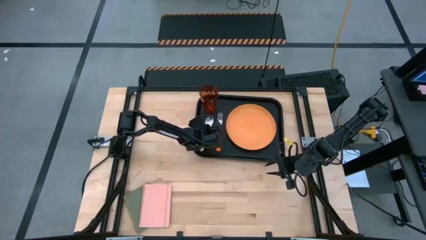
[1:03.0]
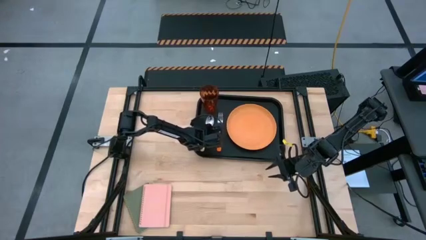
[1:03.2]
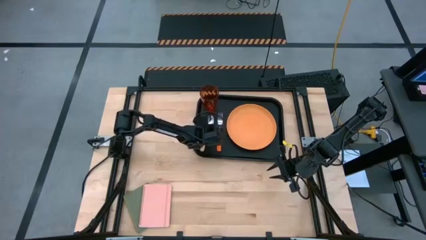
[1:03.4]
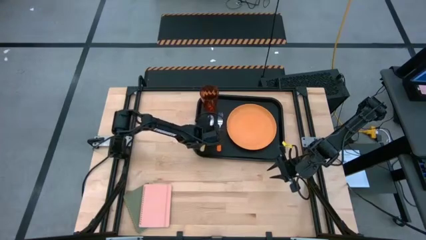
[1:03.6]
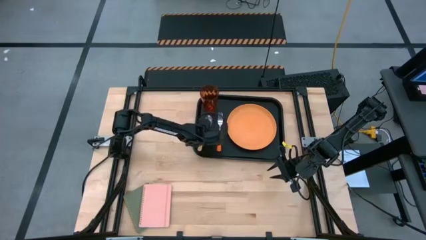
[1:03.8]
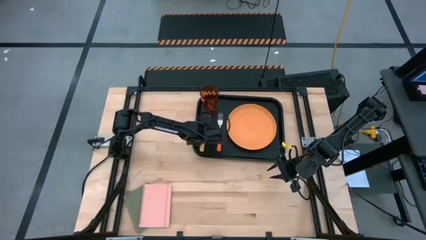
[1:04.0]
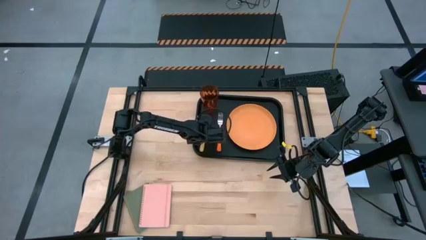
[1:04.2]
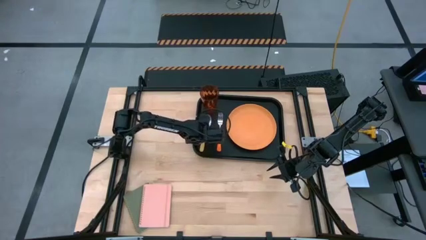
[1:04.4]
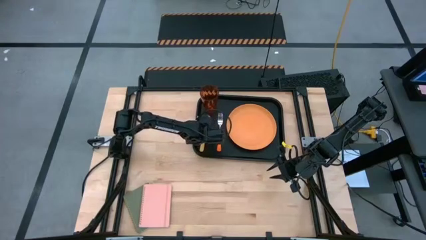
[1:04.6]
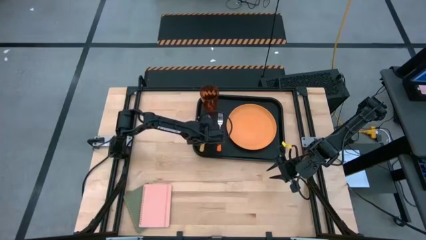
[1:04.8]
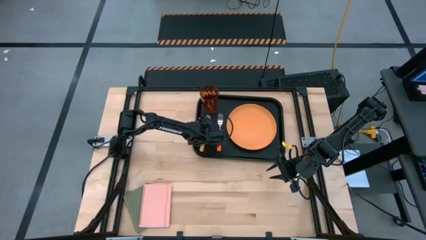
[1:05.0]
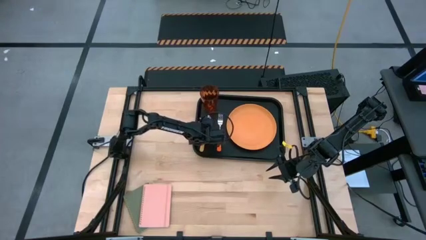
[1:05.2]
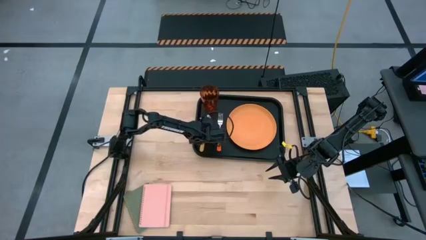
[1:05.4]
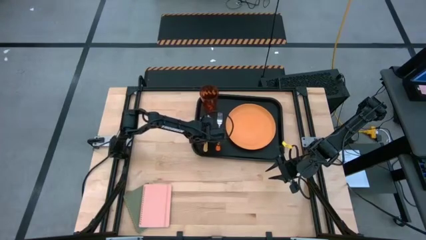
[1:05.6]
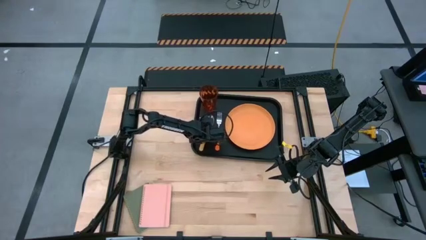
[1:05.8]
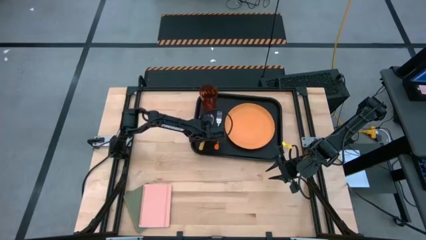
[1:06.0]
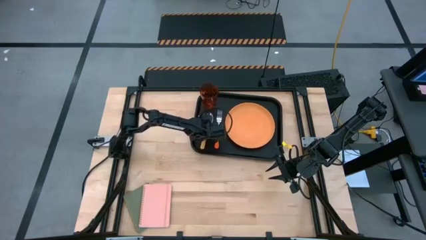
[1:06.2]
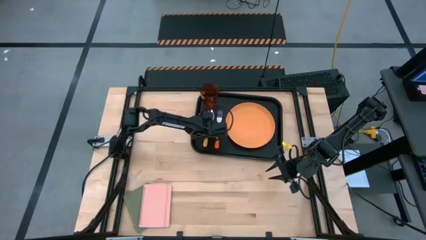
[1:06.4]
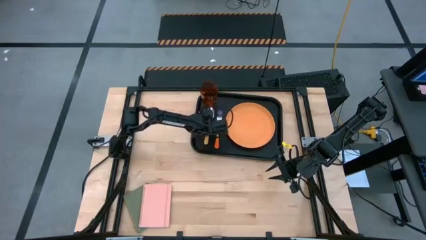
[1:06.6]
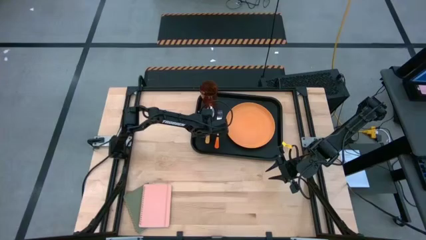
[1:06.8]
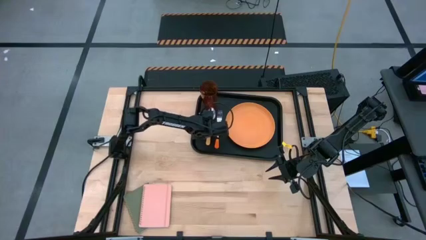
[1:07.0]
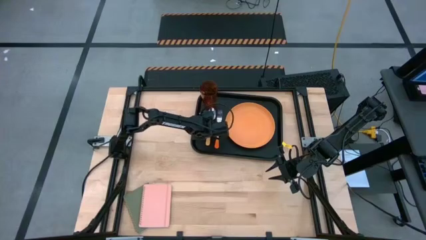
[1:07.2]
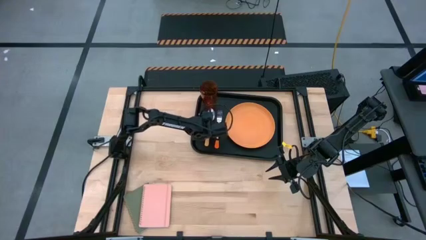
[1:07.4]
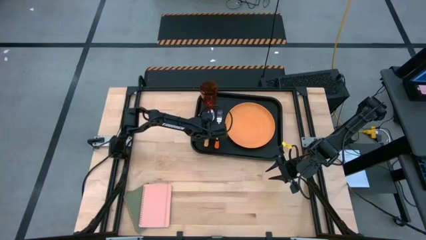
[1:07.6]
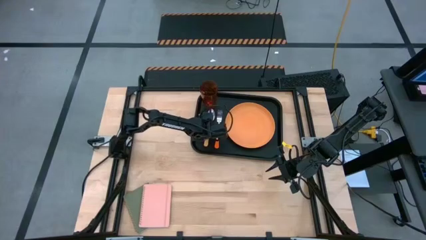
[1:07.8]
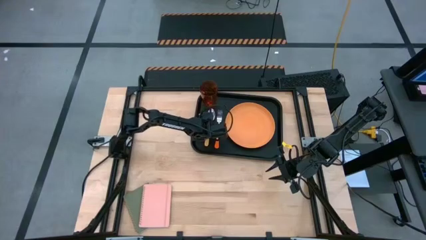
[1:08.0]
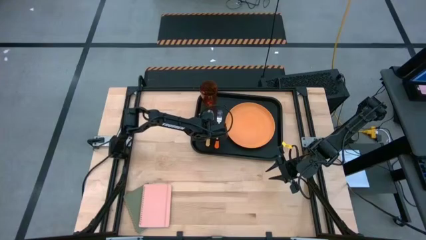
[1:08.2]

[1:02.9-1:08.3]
Task: Pick and place plate/cup/fork/spoon on tray
Put the yellow spoon on the black serving tray to the left of the orange fork

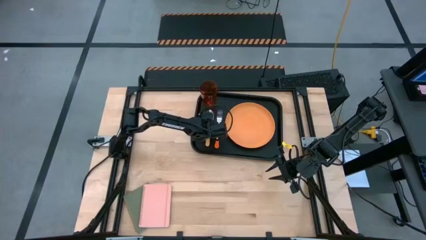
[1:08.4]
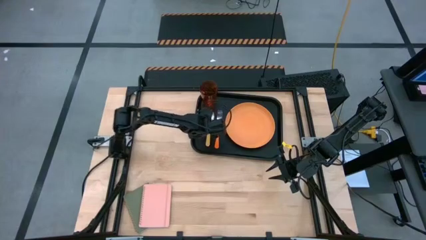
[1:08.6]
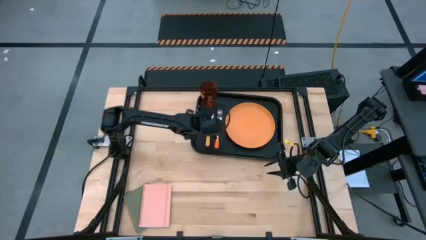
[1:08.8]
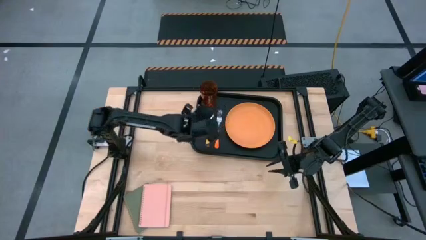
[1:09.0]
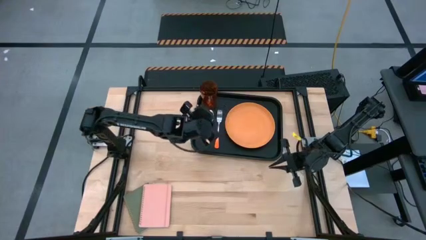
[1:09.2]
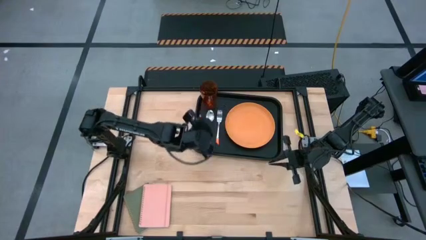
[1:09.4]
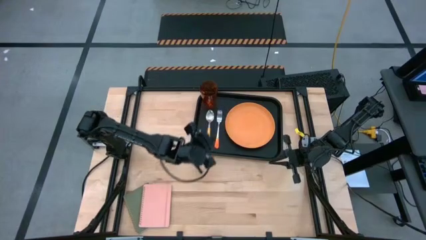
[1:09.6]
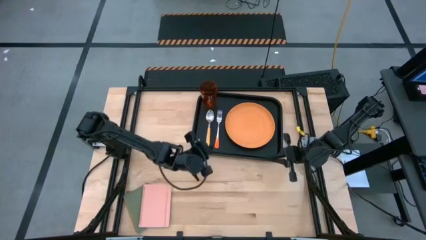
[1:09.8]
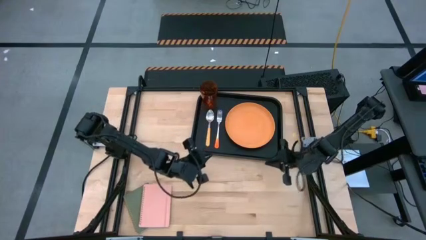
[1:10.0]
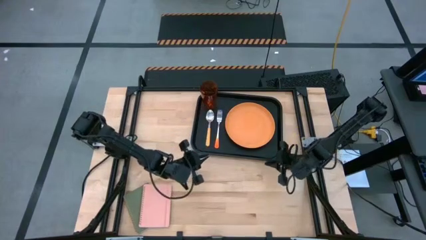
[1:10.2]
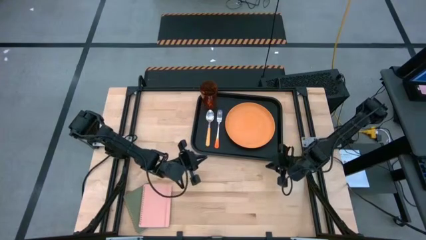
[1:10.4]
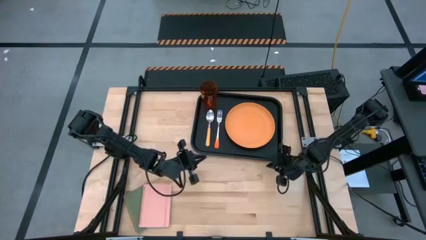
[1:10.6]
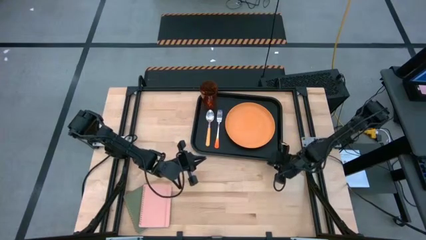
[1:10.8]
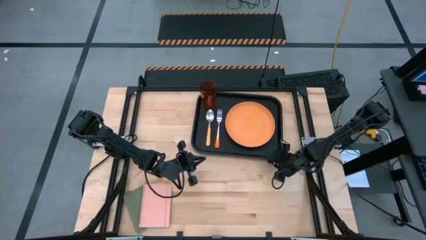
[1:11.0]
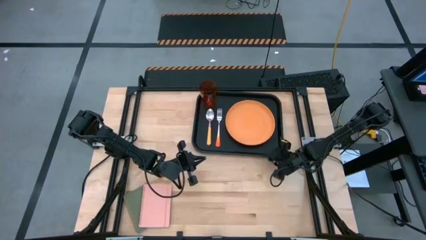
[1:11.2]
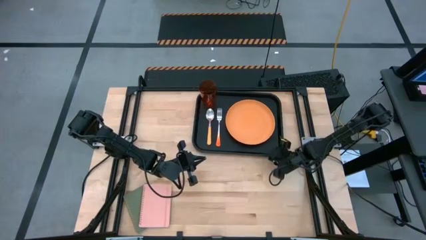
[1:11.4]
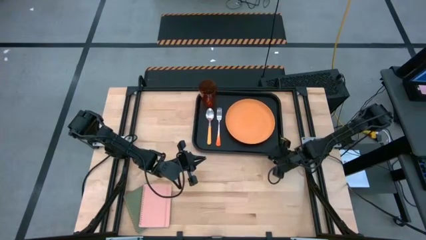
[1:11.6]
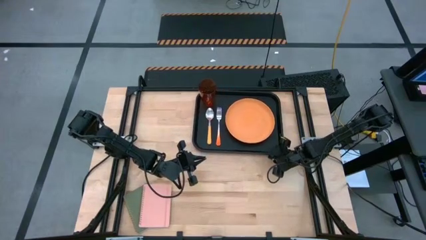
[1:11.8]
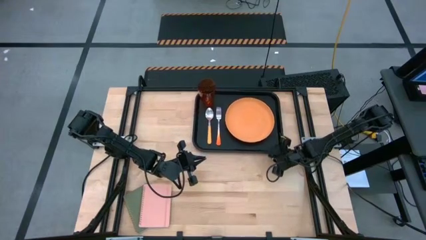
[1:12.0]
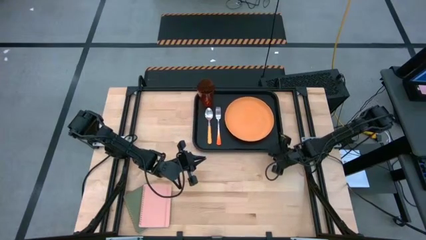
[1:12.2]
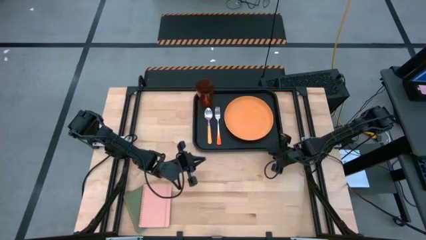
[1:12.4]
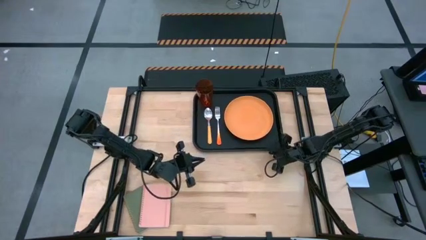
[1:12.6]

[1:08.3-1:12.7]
Adjust the black serving tray

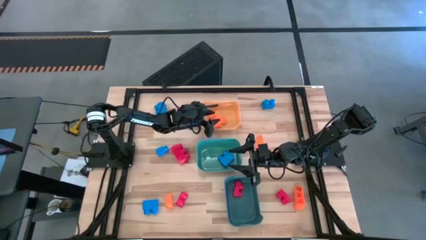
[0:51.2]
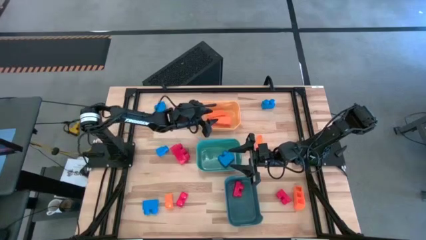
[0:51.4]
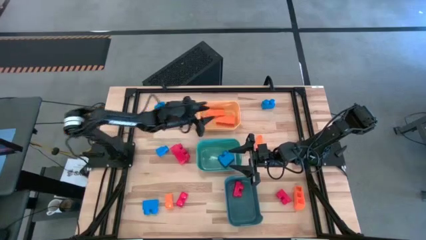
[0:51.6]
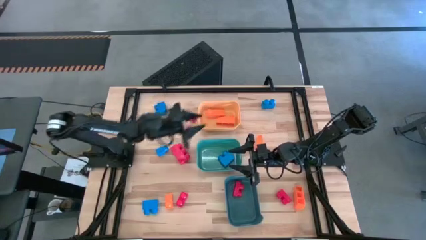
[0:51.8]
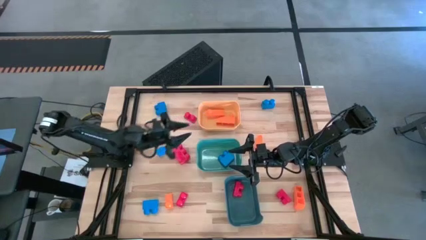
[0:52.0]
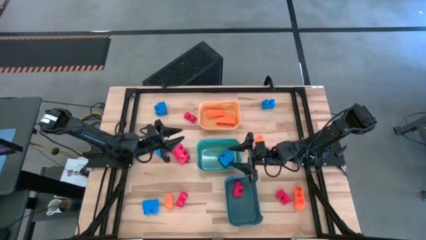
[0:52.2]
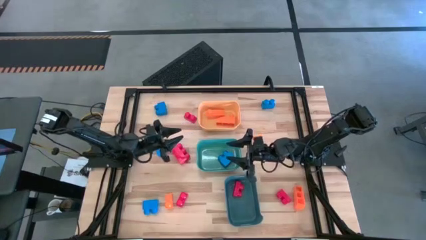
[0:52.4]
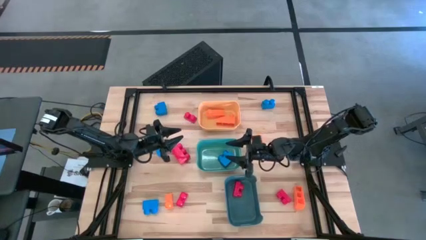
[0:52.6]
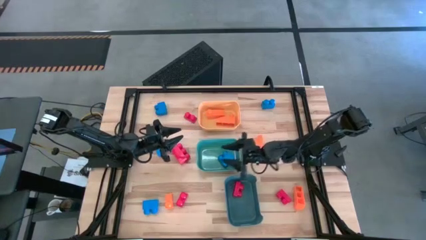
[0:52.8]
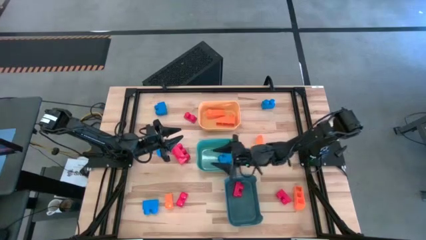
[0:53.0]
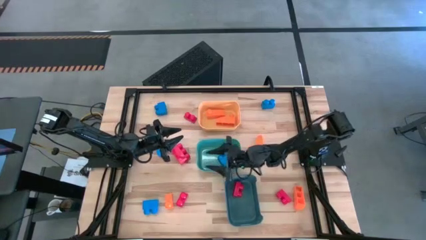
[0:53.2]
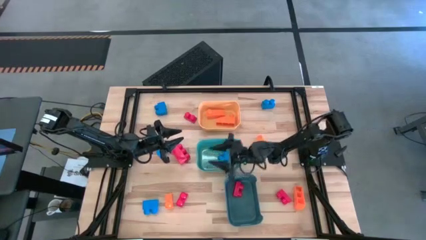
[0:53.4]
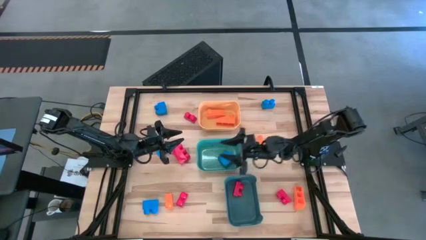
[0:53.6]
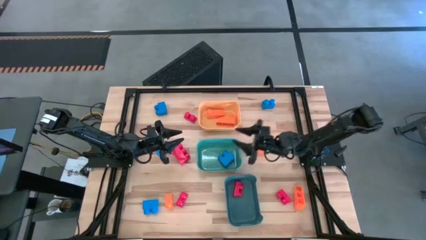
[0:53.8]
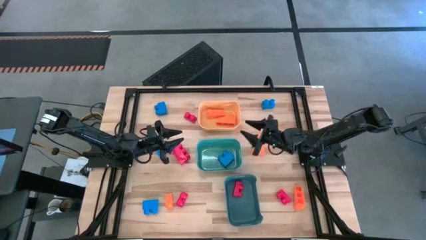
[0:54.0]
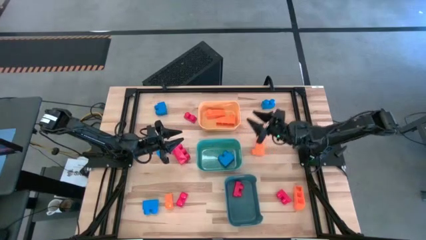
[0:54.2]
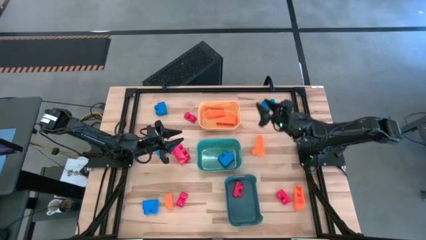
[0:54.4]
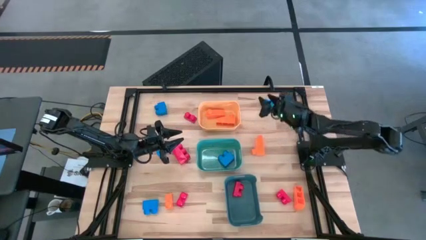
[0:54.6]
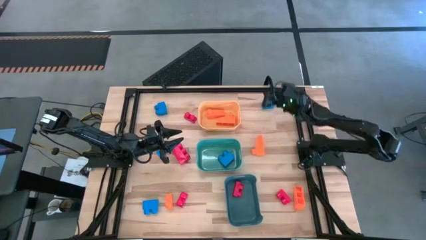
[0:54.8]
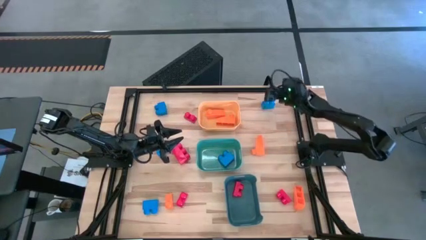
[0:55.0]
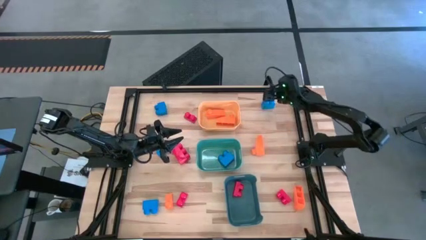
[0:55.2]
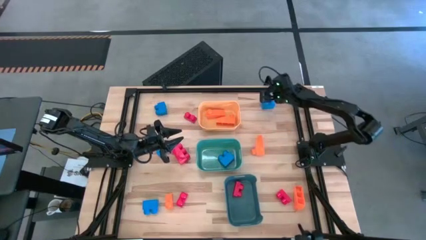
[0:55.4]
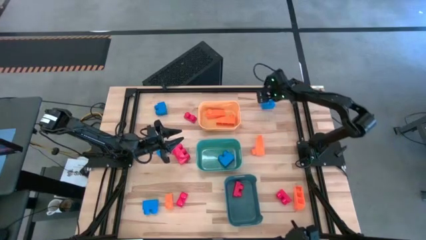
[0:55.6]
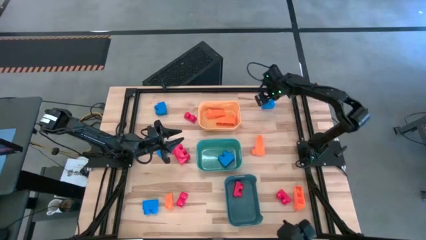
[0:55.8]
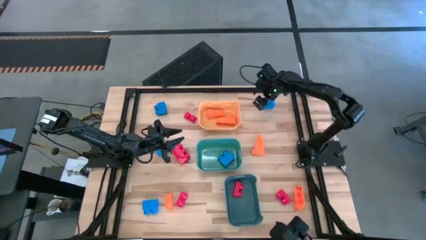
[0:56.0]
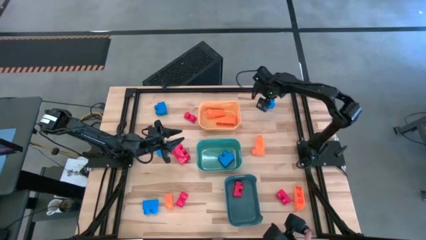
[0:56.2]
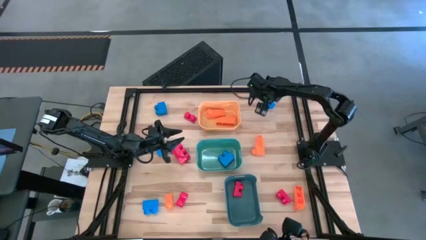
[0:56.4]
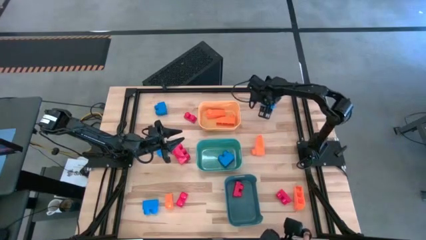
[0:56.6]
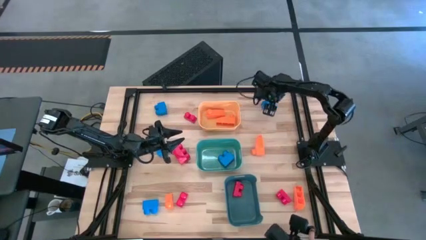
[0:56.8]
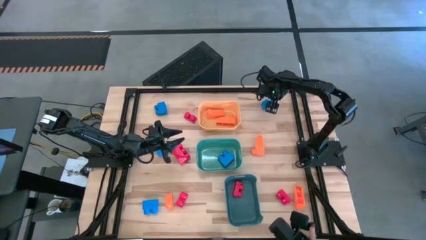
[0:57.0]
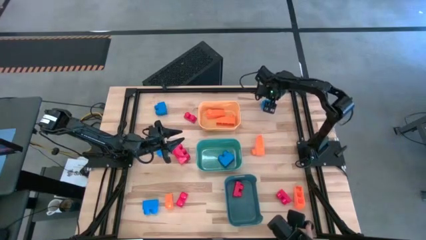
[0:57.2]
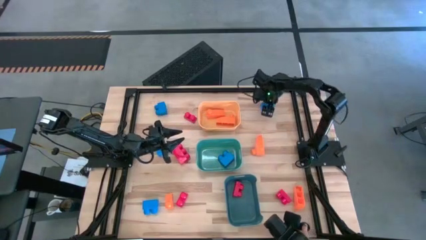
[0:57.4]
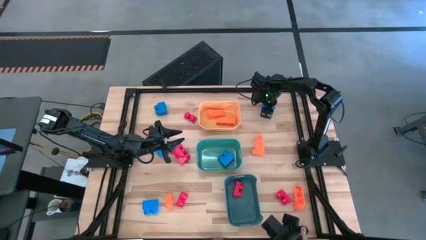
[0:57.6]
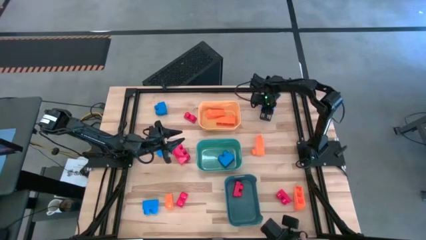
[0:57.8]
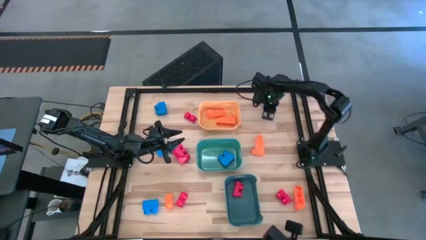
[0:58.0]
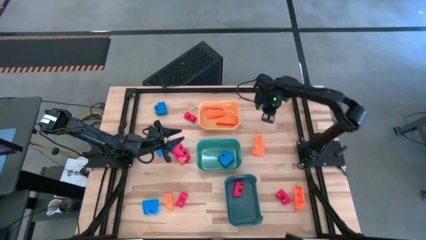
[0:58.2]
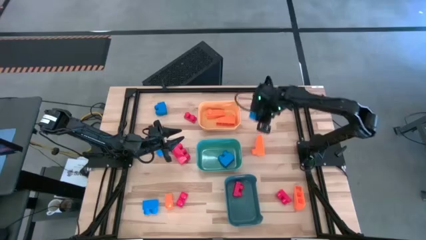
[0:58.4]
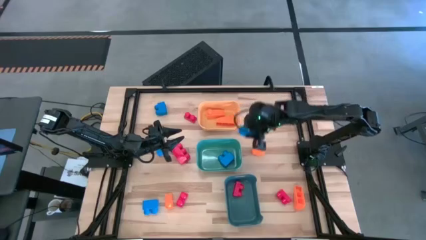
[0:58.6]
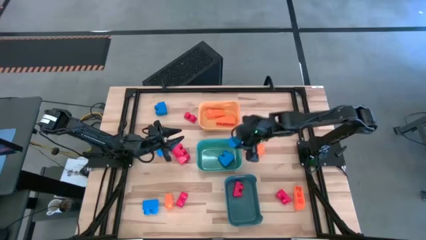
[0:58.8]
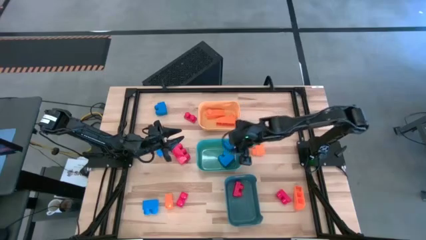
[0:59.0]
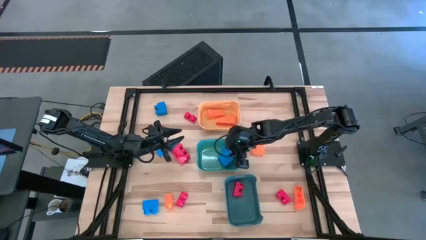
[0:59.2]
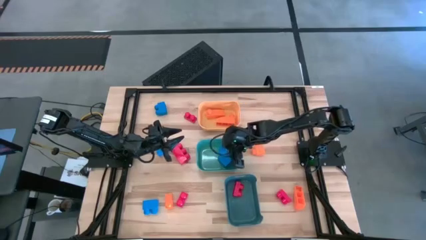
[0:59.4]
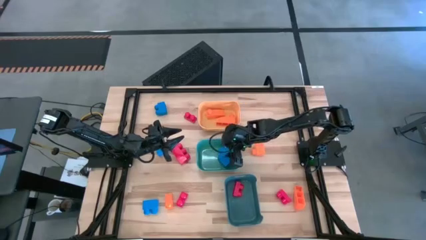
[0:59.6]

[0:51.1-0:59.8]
Task: Sort & place blocks by color
Put the blue game piece into the green bin
